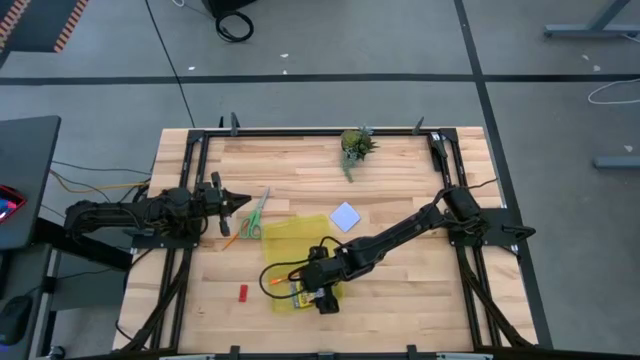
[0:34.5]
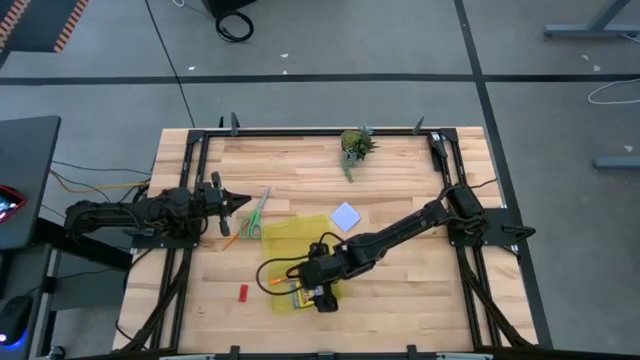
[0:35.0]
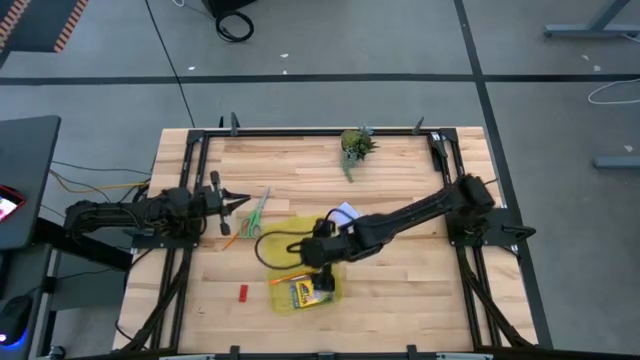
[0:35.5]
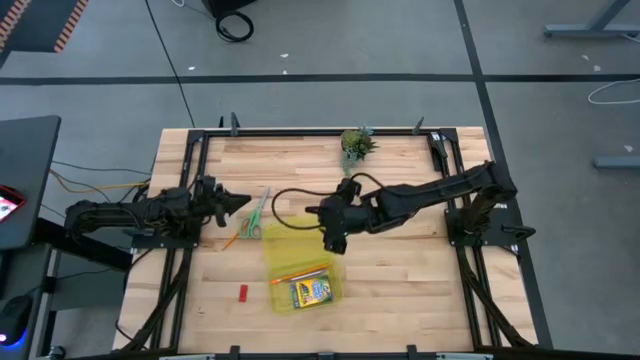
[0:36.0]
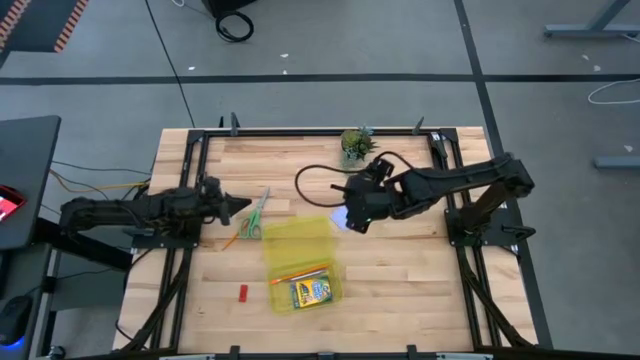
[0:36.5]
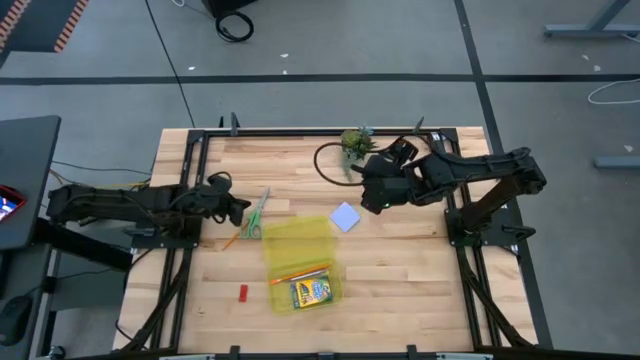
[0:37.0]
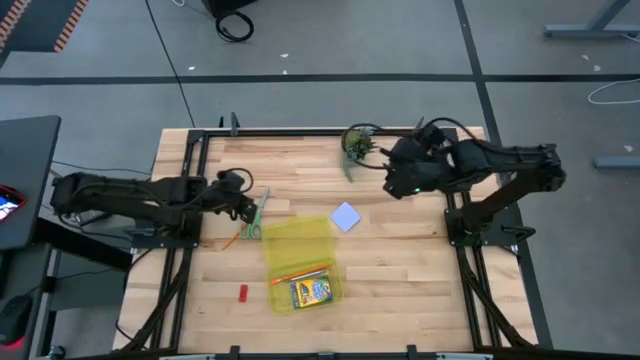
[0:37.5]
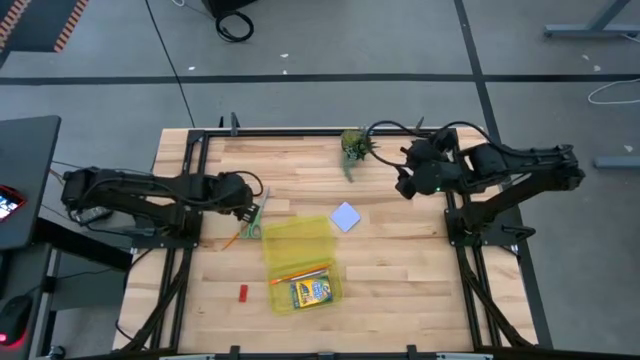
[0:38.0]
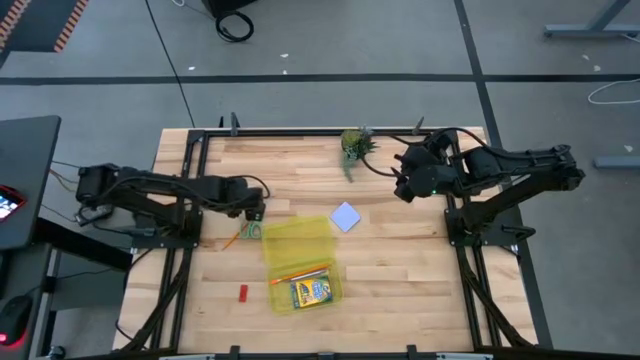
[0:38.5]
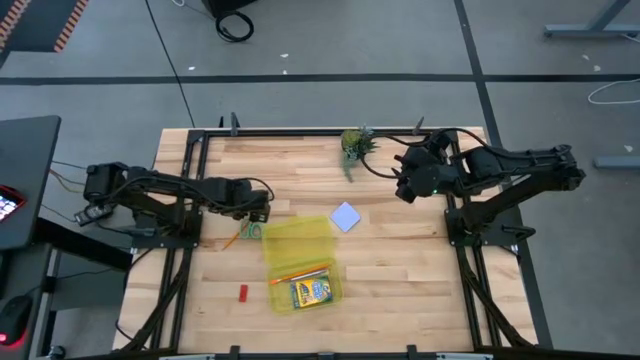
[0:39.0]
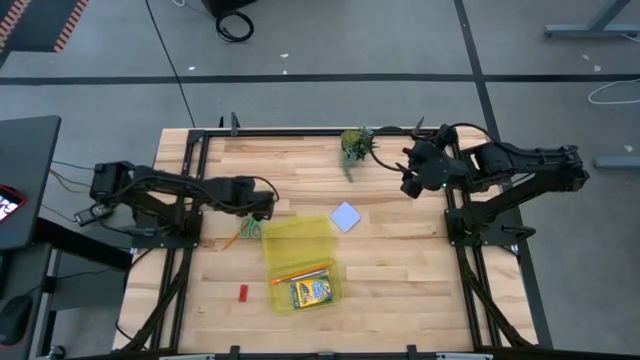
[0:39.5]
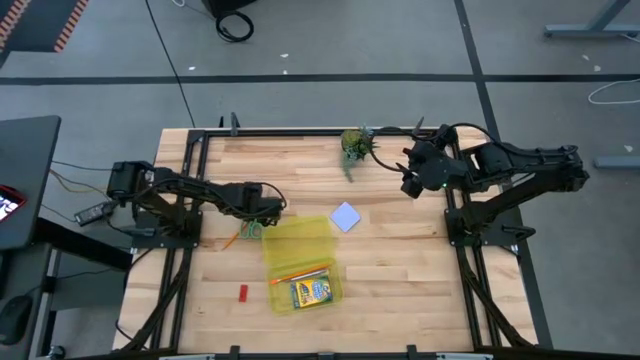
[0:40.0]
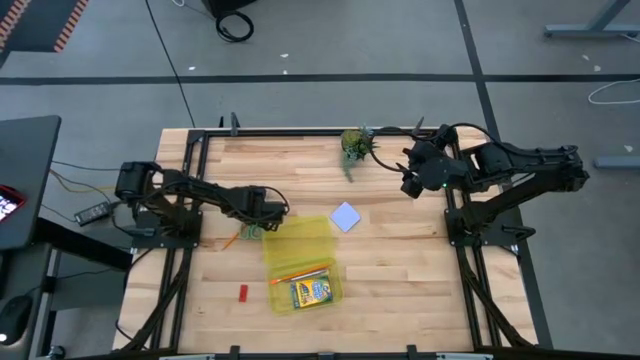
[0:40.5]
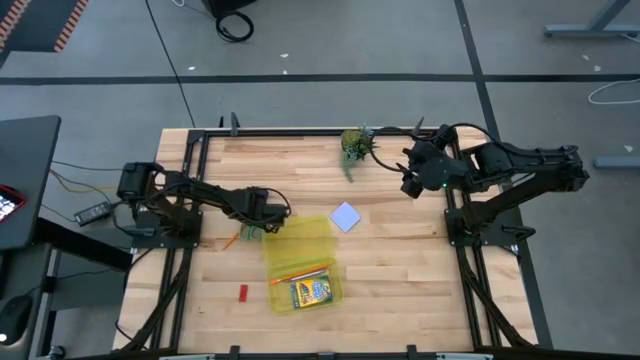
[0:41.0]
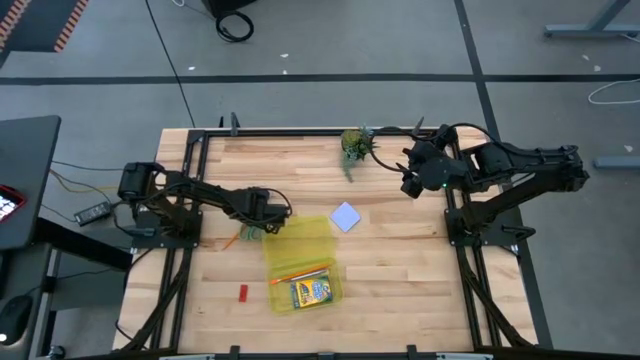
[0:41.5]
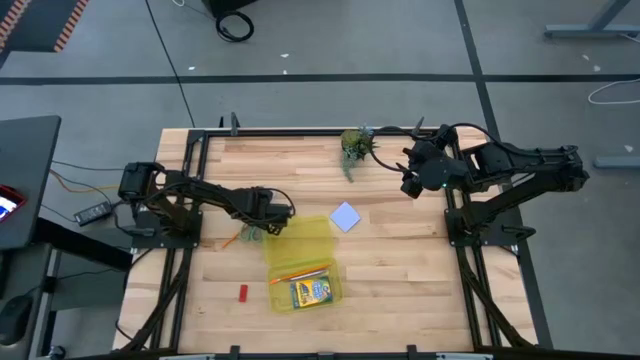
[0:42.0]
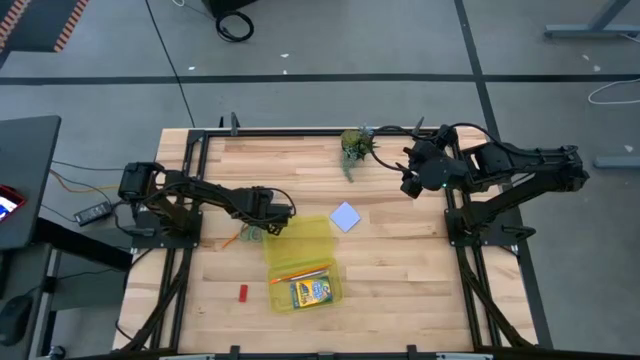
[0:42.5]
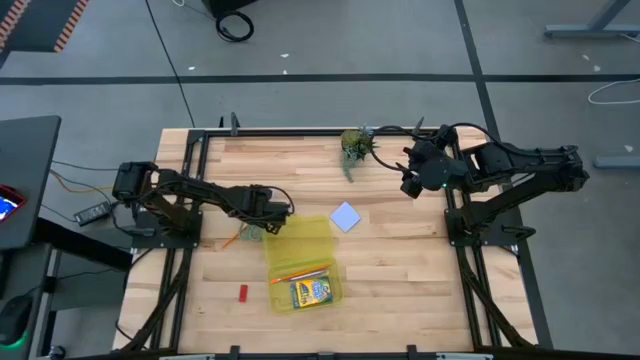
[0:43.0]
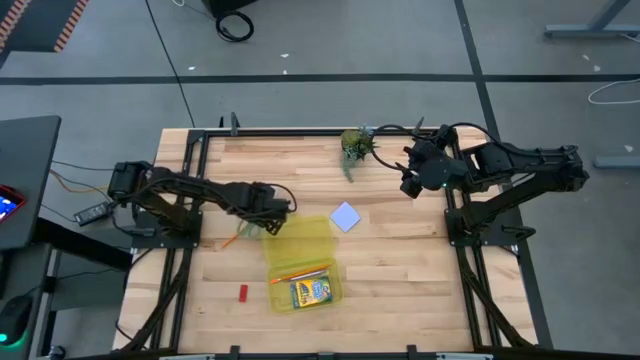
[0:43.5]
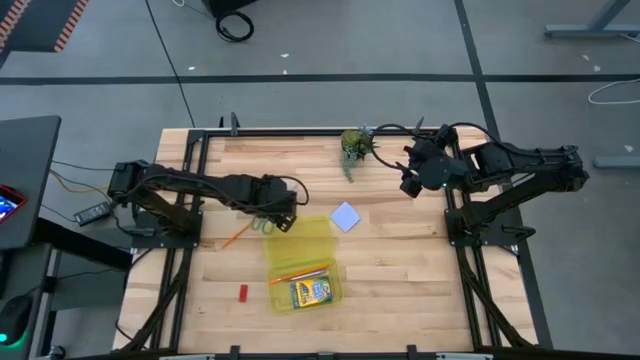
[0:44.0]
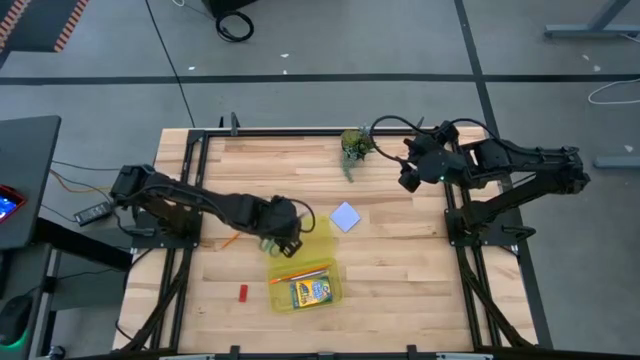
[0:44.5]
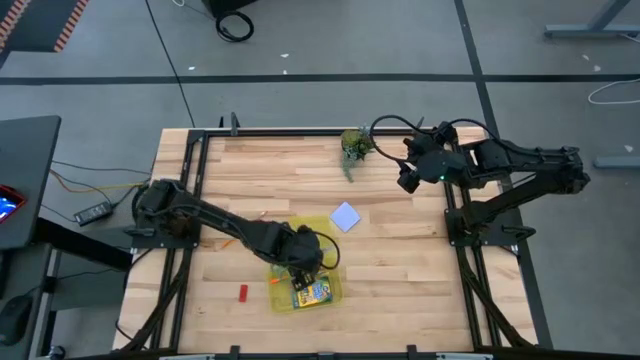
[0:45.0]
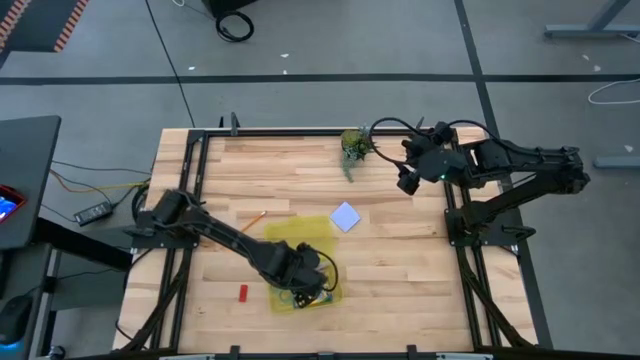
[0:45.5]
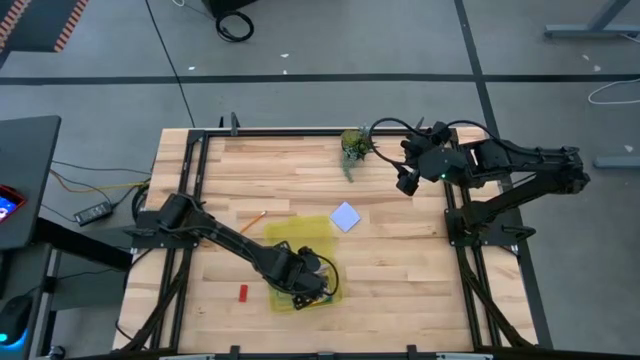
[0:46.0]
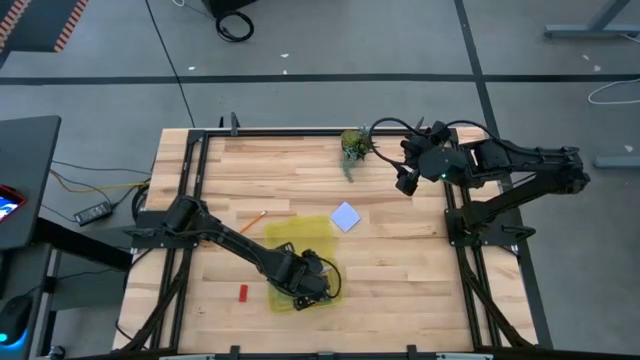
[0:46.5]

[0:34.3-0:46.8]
Task: Pack school essentials
Put the green scissors into the yellow supply box

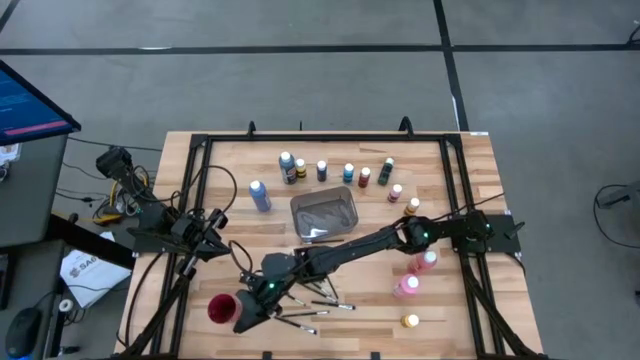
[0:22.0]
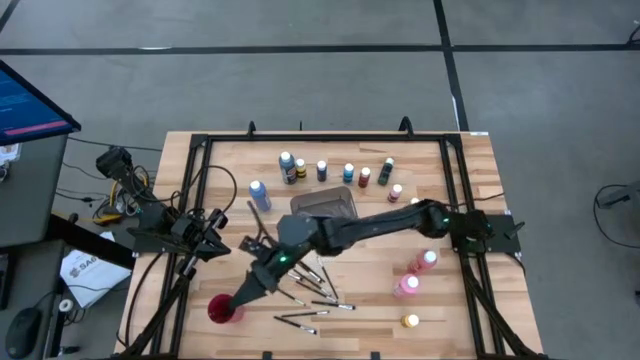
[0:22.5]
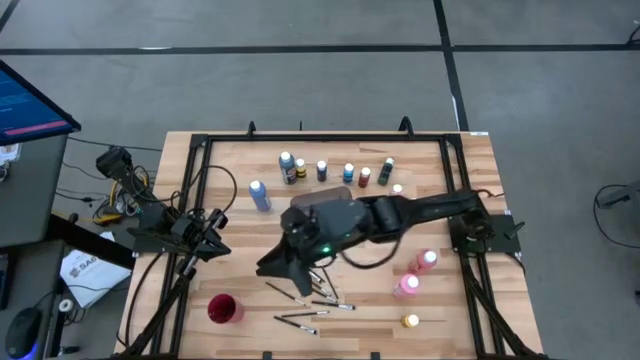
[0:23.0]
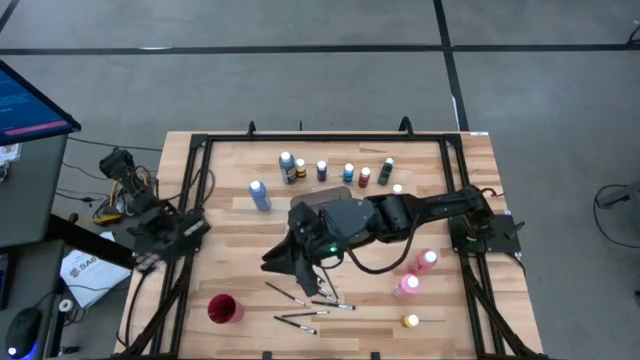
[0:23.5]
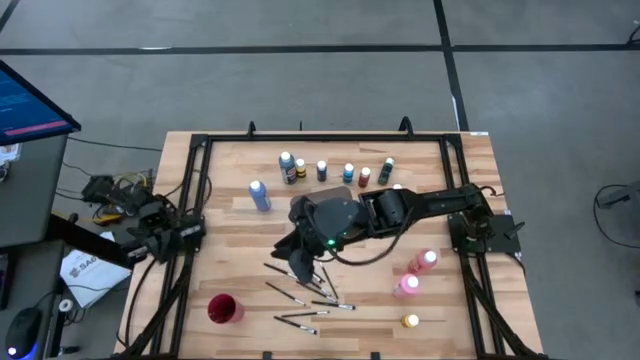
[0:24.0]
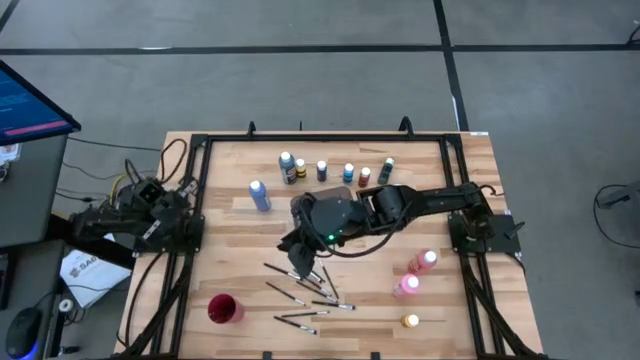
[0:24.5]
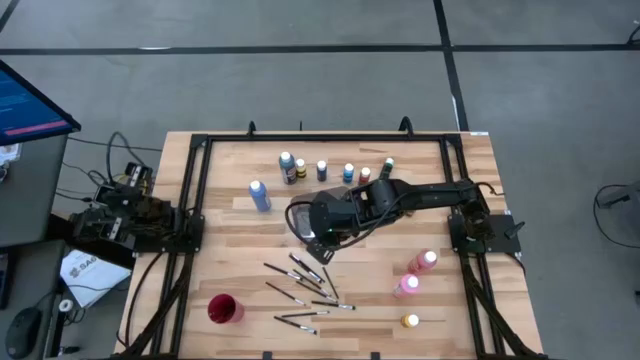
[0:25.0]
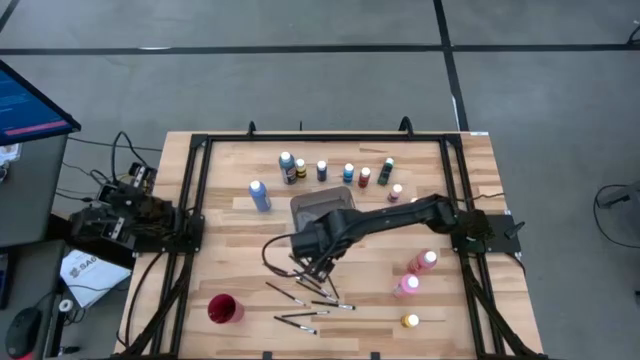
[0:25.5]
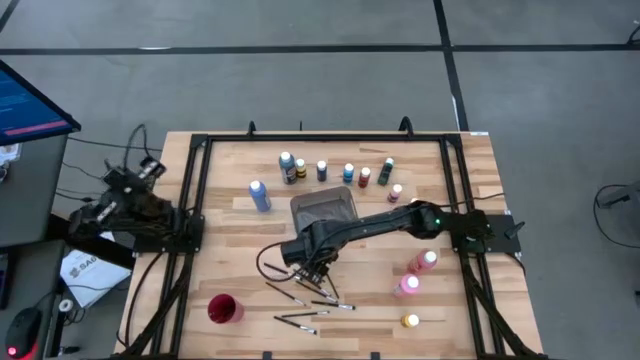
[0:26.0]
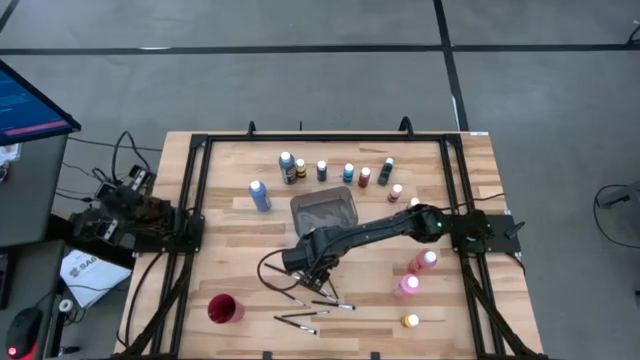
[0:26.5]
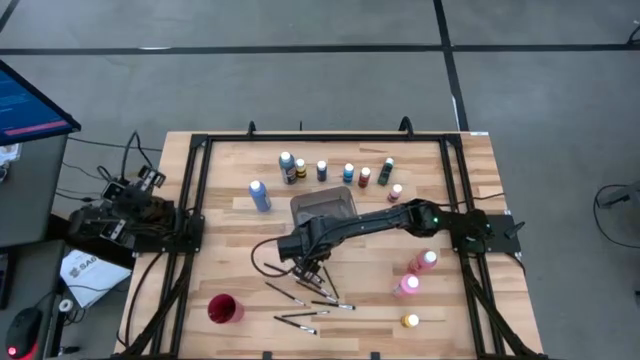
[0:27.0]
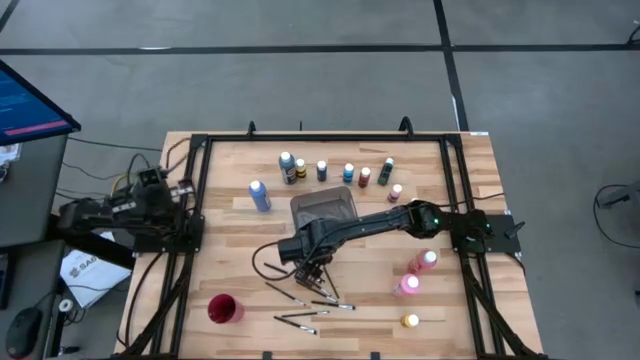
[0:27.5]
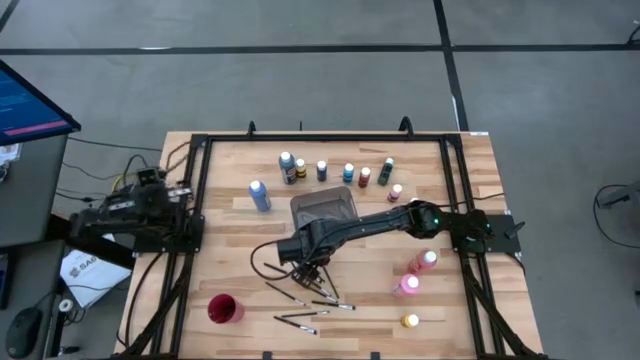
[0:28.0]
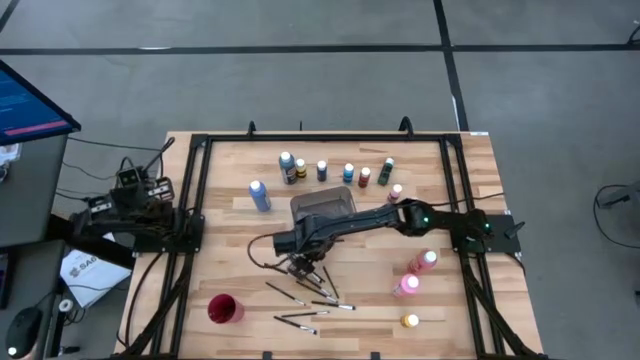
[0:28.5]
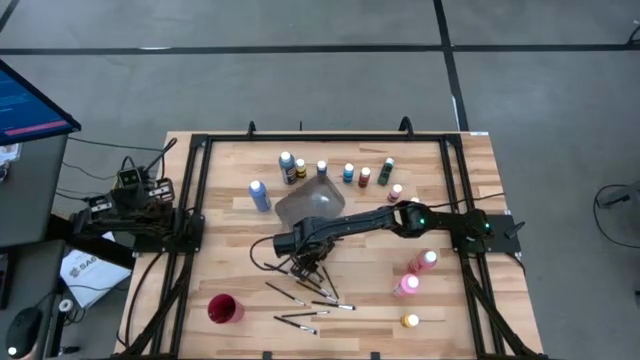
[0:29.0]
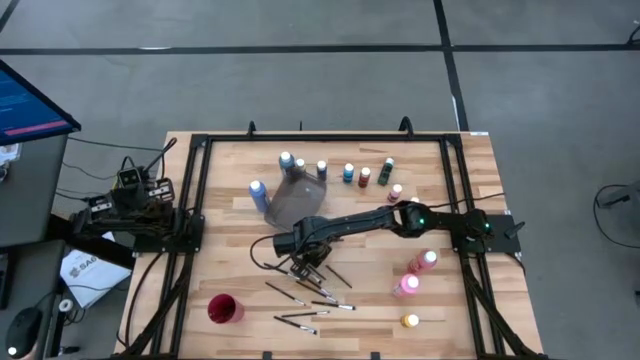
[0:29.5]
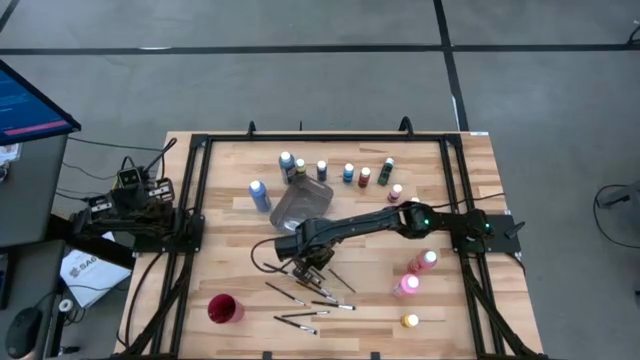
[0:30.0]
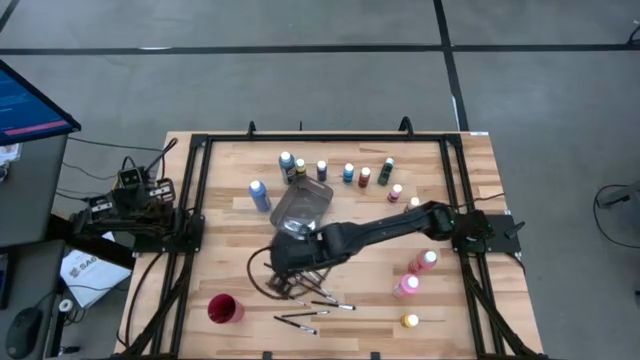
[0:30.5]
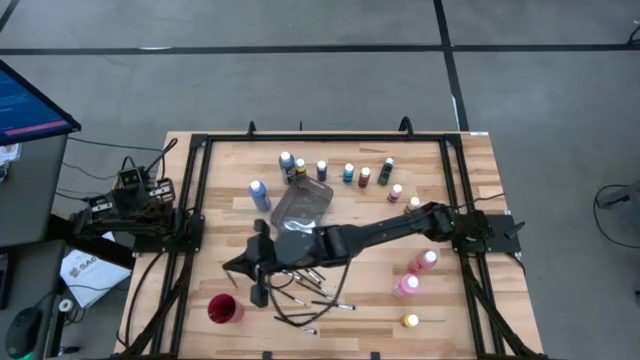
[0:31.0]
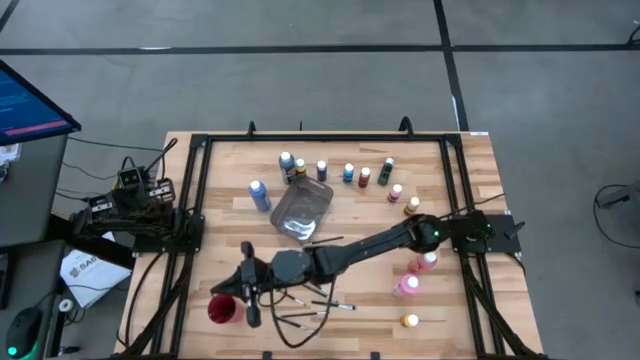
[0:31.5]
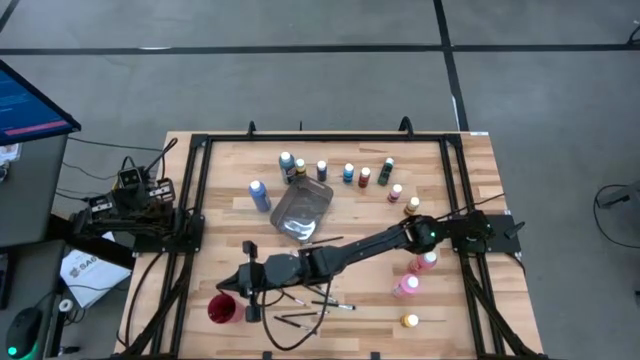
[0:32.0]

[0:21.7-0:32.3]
Task: Pick & Place Paint Supplies
Put the silver paintbrush into the red cup
